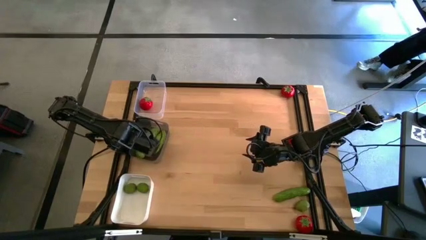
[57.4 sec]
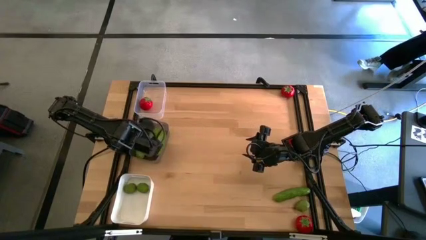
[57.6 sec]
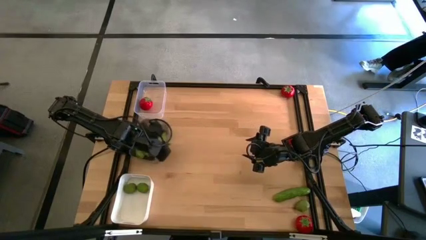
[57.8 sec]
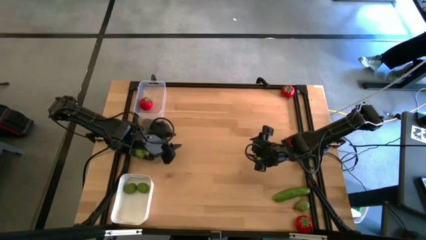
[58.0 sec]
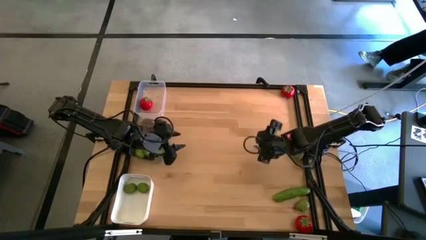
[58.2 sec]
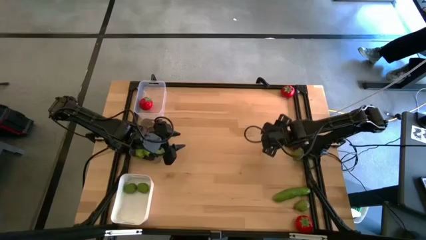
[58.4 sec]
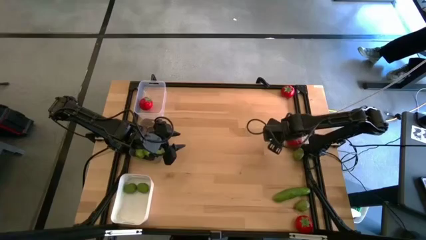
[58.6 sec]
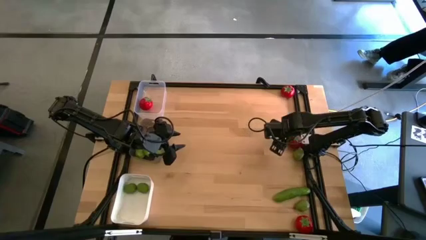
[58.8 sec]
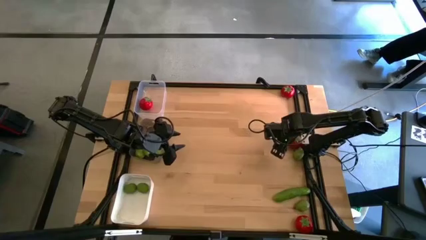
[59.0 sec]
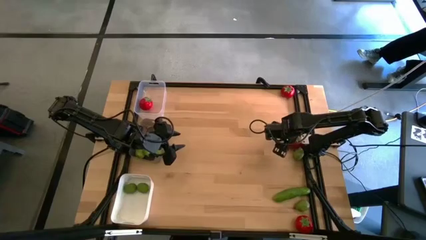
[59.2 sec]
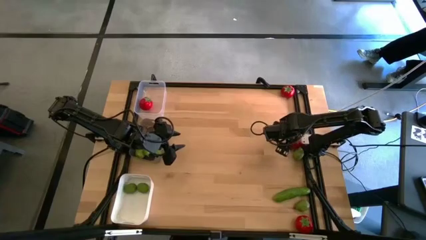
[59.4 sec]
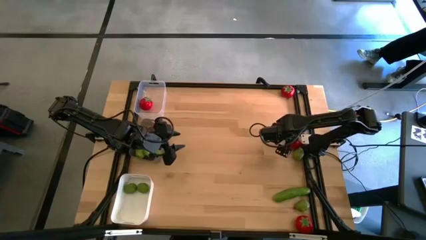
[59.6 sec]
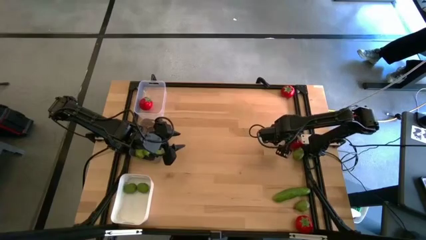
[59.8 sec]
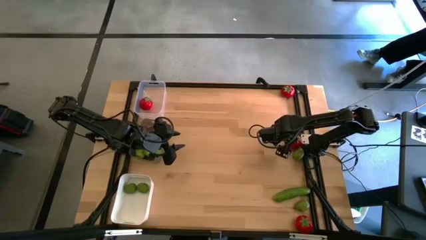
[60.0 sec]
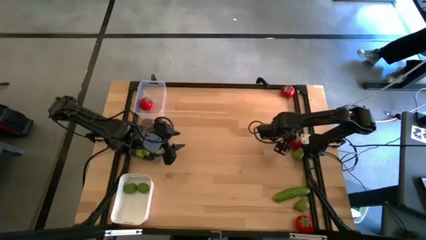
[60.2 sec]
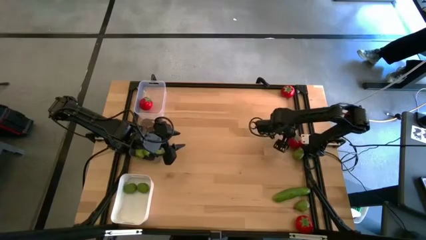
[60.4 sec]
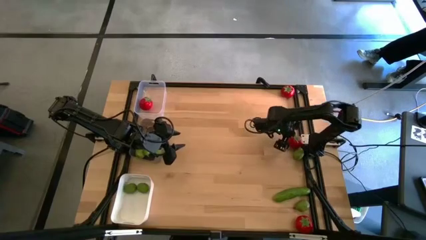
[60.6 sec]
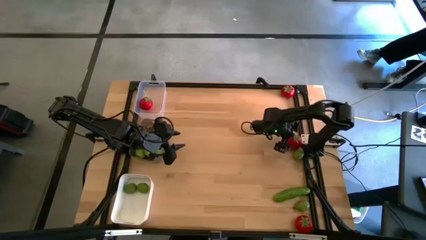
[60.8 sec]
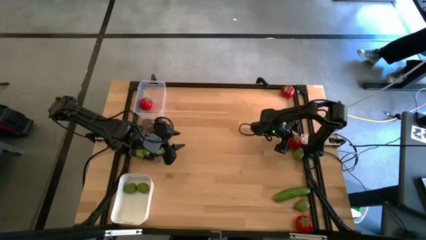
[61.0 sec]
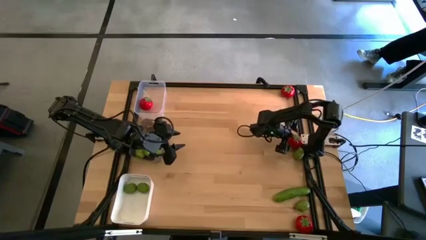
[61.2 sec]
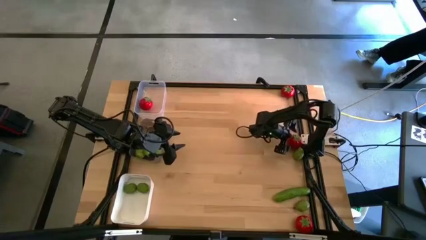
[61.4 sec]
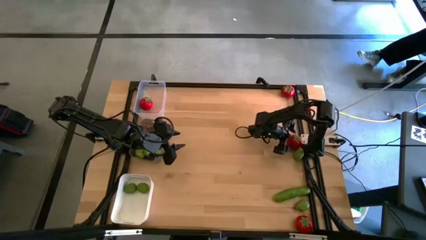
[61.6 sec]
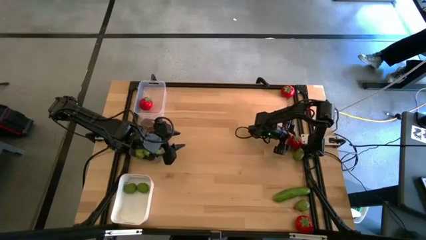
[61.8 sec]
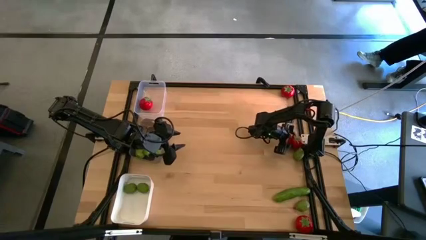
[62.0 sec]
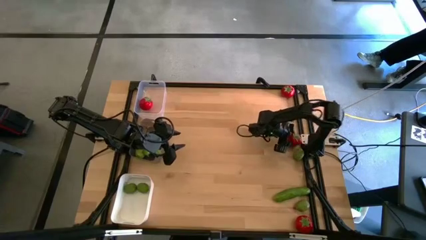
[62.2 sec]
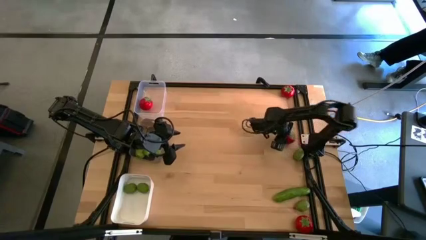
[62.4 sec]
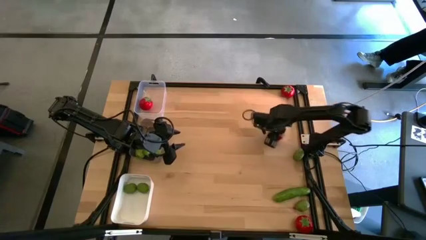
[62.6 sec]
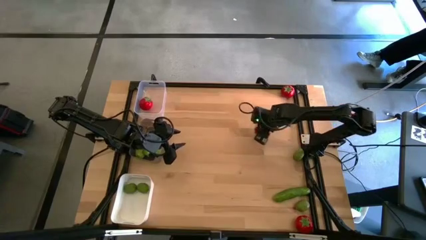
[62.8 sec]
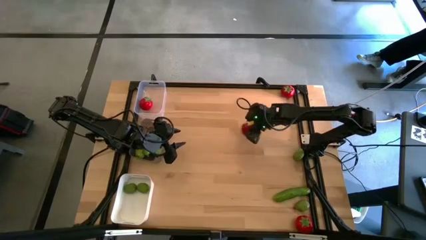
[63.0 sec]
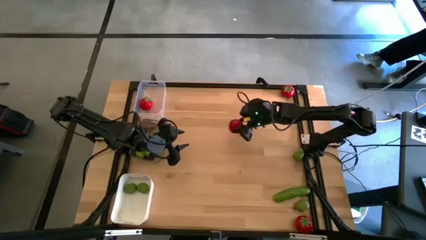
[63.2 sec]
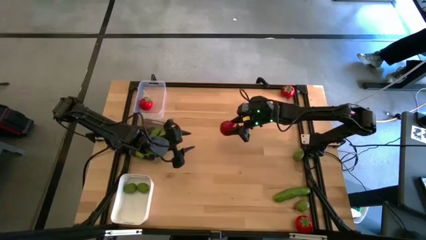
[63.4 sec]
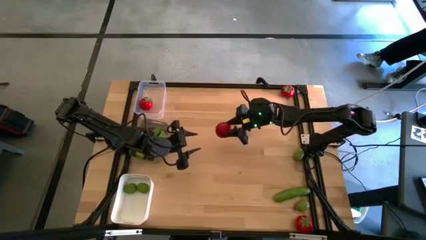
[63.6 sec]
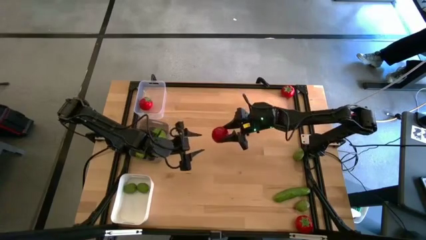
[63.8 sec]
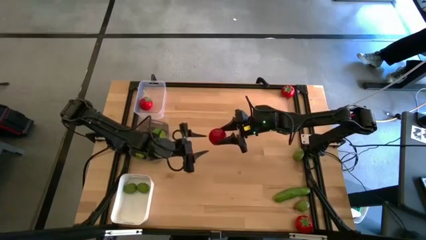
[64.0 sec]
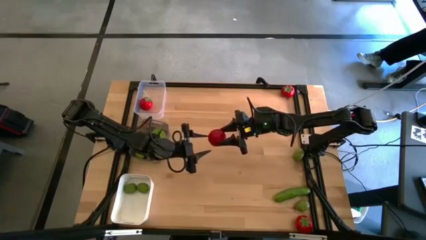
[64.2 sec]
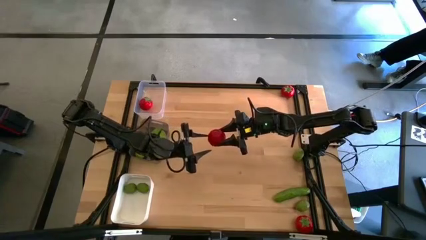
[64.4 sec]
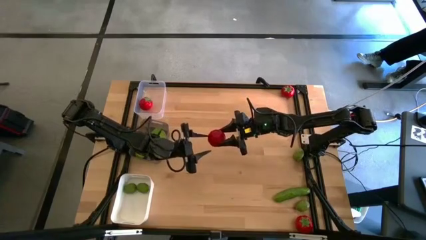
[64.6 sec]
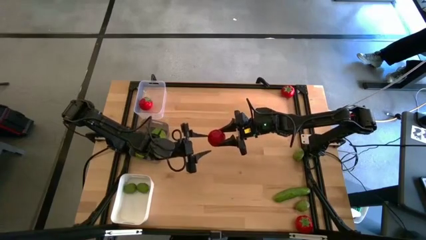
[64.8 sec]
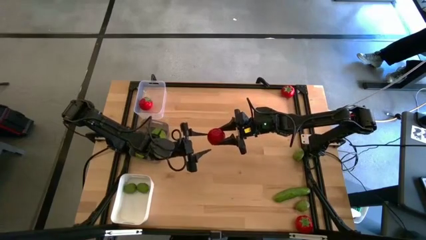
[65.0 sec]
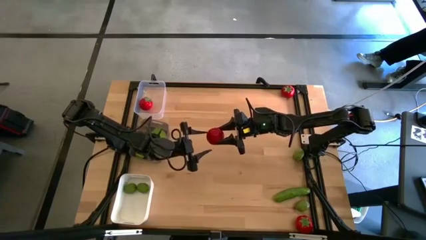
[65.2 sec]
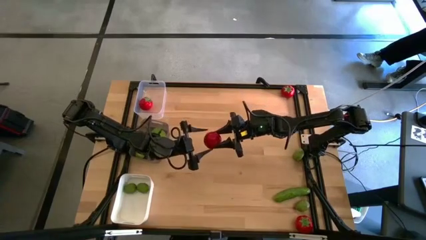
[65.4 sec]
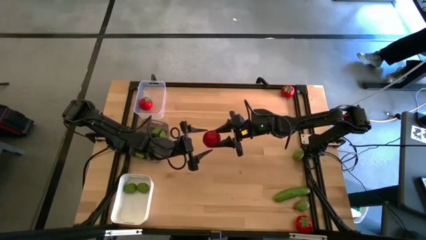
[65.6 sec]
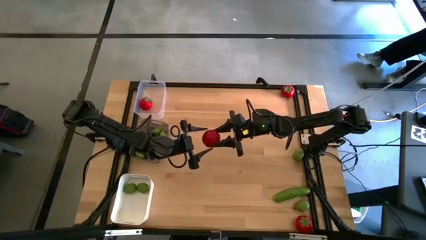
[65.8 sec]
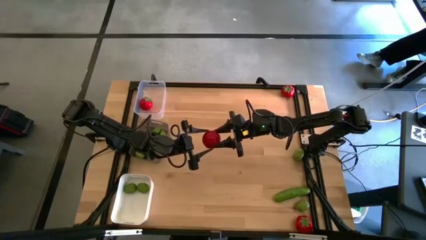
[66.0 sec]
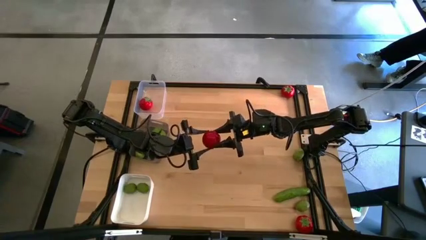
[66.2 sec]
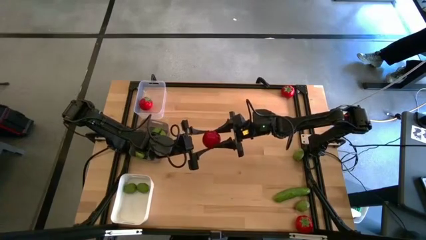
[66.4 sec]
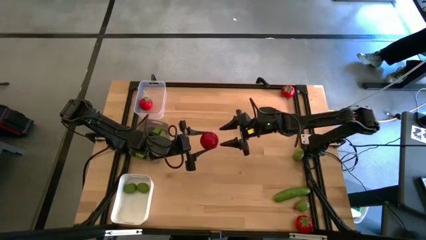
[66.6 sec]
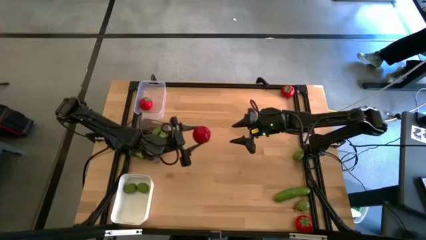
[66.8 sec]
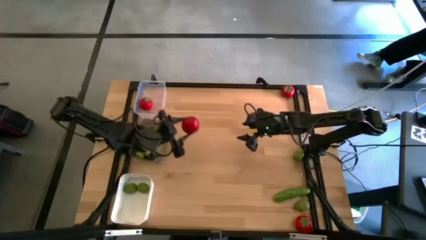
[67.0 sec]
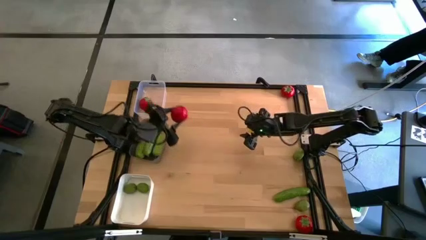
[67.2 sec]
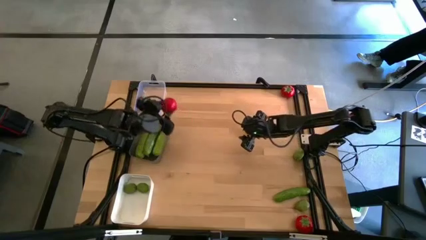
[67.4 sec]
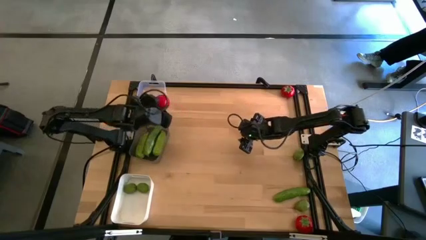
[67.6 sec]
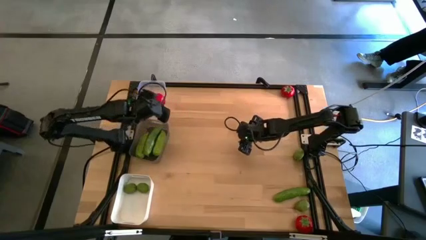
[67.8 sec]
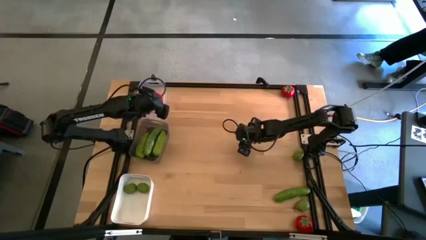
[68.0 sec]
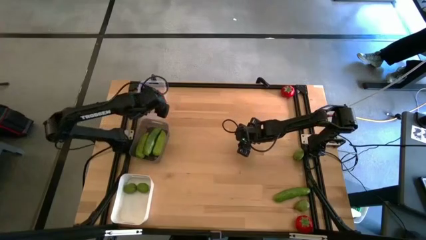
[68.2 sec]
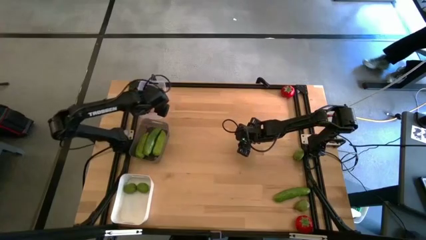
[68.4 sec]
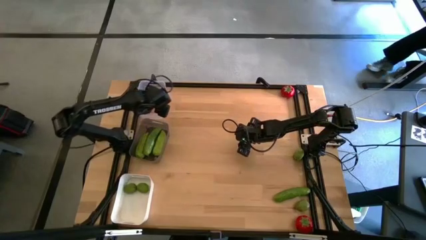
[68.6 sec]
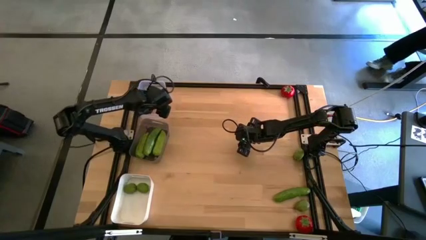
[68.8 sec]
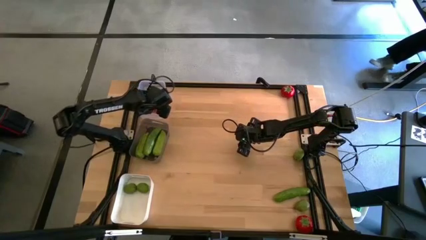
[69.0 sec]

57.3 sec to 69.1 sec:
Task: Sort produce into baskets
Put the middle right tomato into the transparent bin

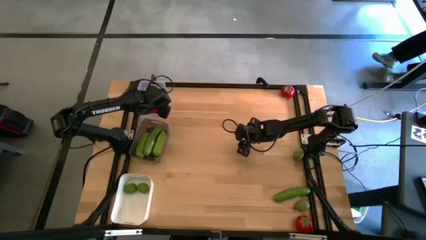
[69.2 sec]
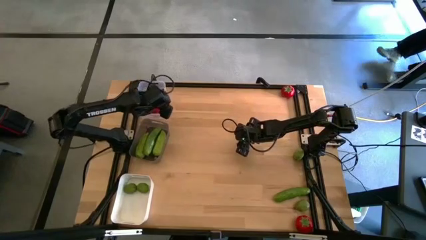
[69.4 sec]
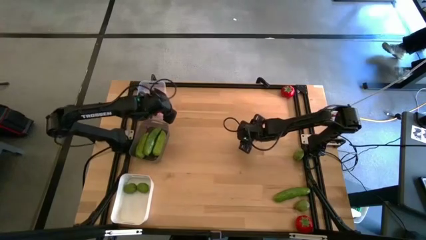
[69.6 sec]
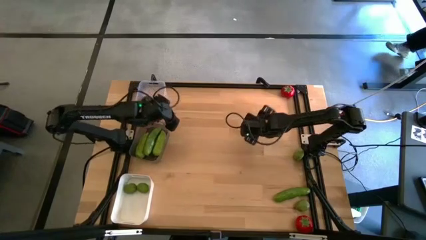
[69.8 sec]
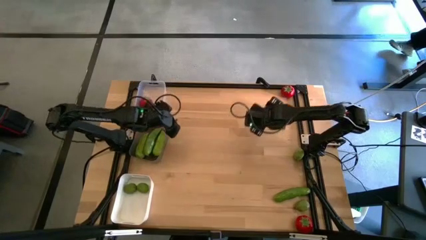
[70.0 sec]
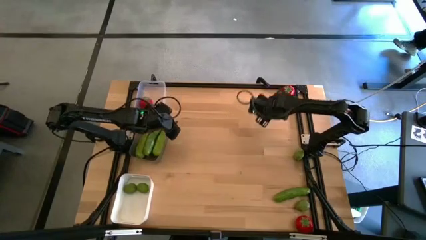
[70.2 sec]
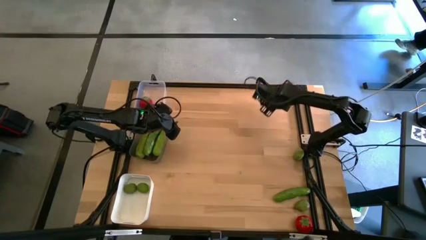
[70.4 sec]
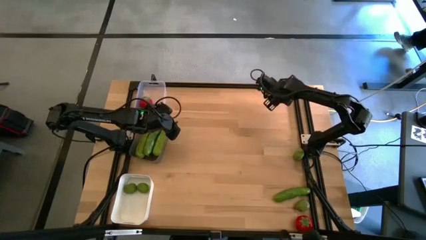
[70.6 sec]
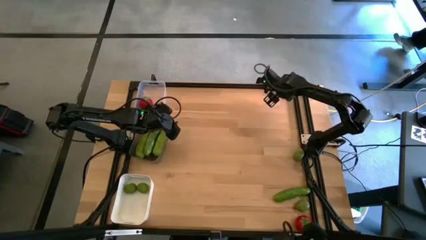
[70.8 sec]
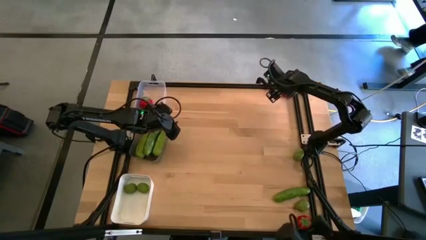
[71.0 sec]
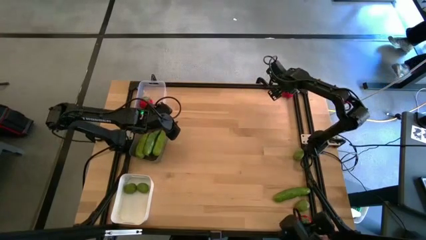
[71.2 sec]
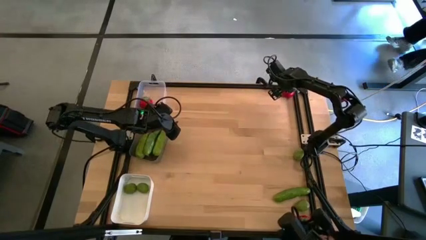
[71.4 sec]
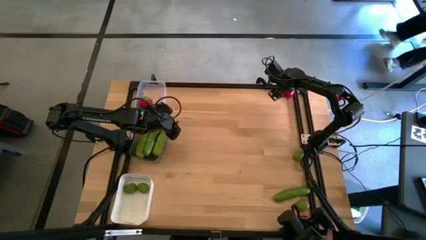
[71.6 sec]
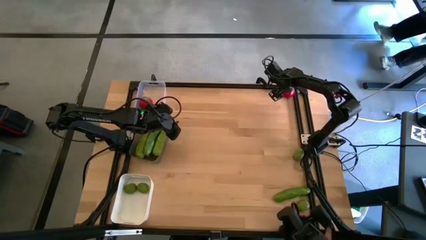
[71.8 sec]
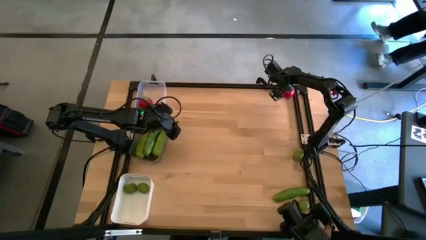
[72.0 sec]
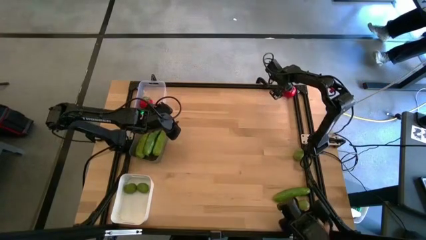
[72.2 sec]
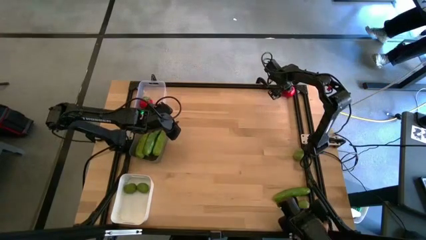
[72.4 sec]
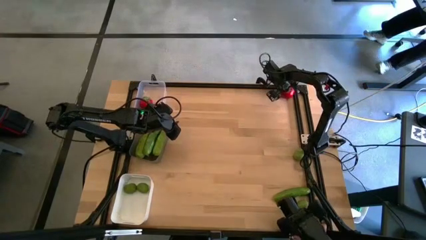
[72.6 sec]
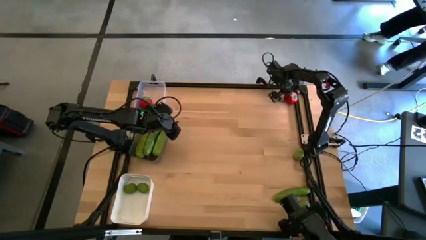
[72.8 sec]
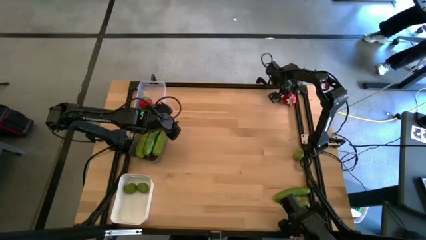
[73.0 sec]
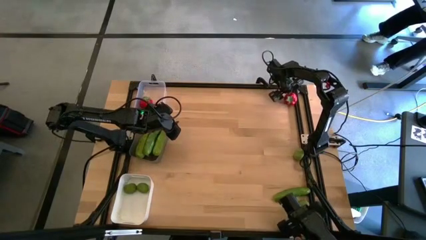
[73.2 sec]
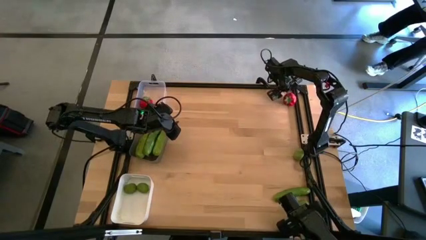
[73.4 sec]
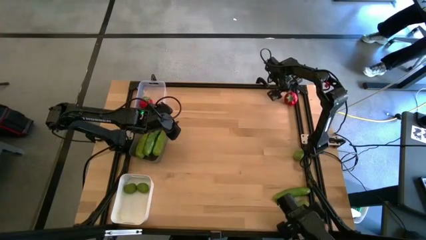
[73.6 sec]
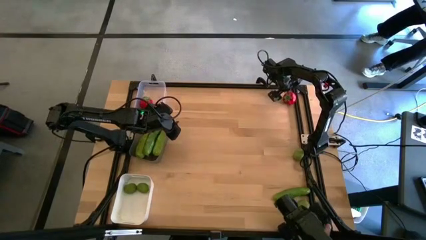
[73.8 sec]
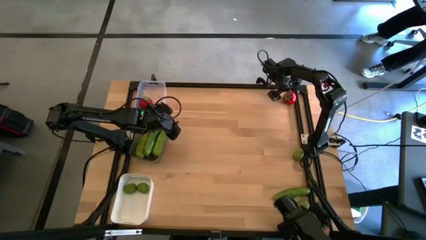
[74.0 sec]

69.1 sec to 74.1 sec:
Put the top tomato into the transparent bin
